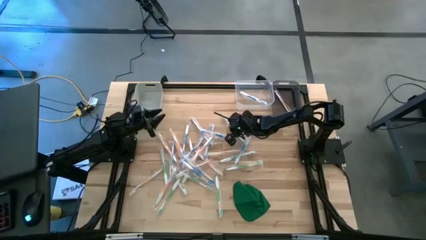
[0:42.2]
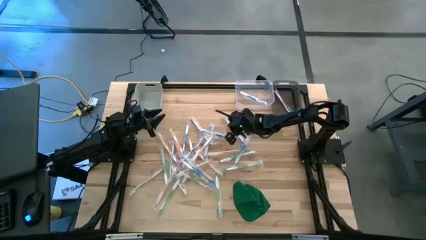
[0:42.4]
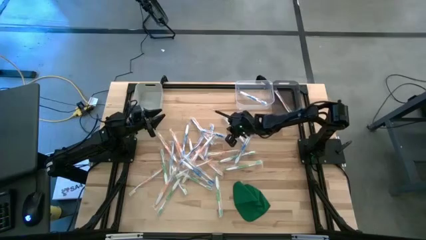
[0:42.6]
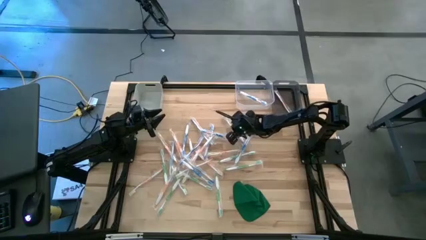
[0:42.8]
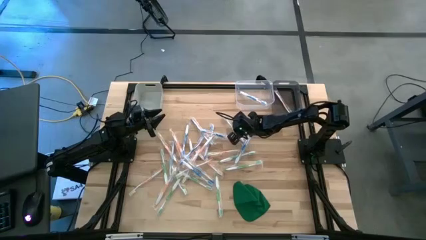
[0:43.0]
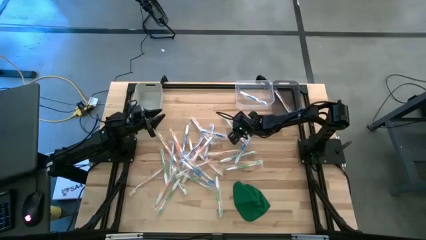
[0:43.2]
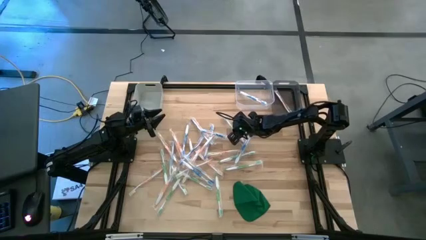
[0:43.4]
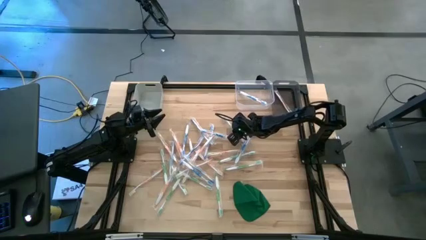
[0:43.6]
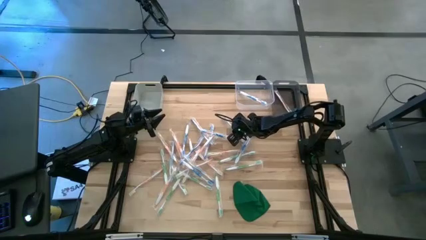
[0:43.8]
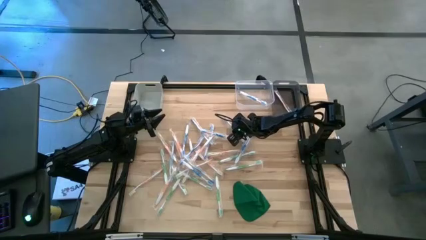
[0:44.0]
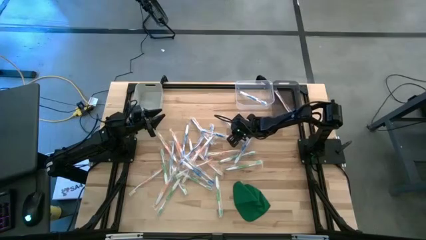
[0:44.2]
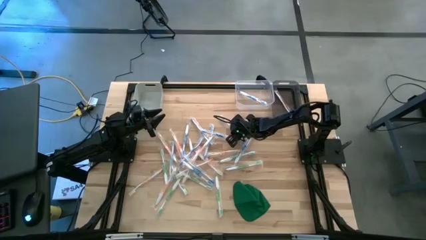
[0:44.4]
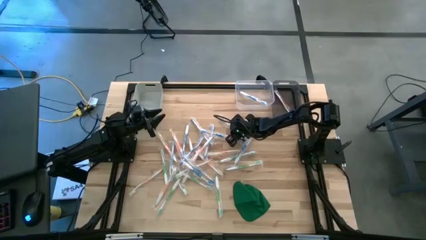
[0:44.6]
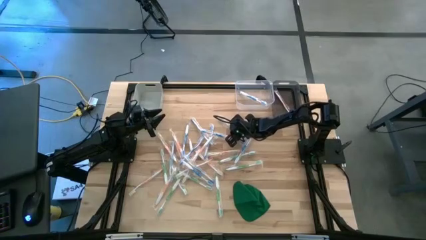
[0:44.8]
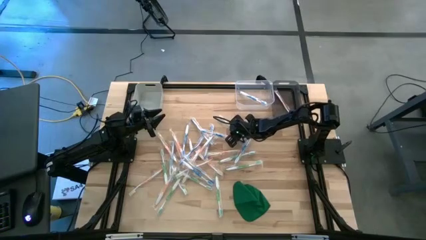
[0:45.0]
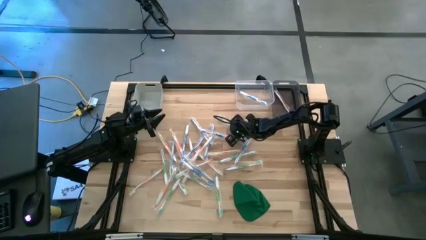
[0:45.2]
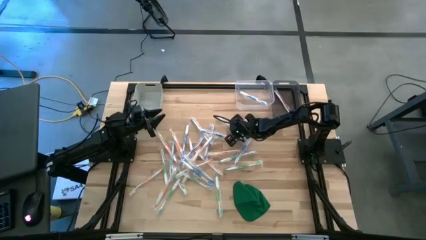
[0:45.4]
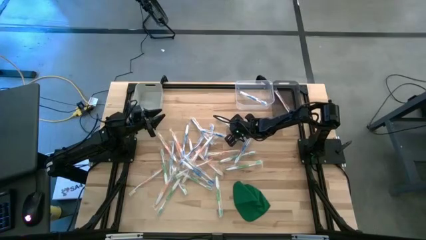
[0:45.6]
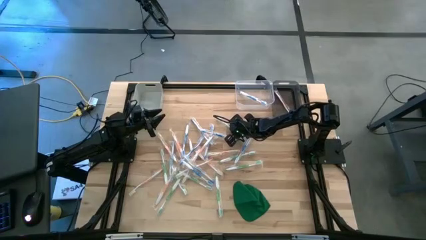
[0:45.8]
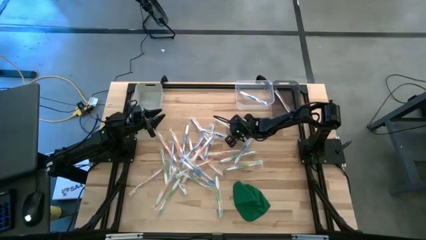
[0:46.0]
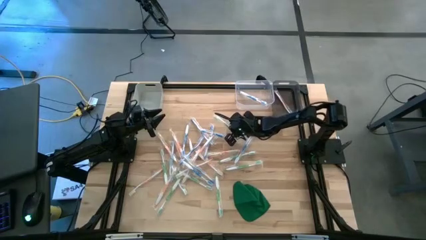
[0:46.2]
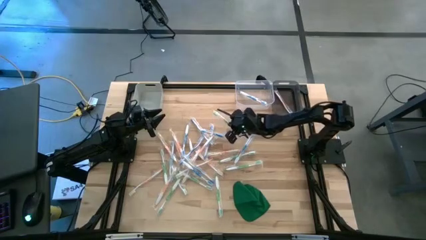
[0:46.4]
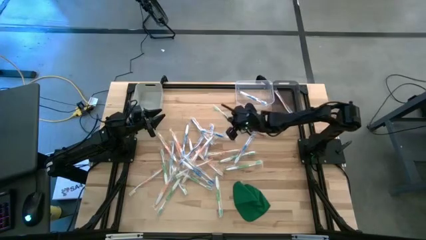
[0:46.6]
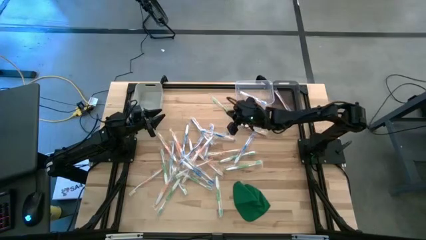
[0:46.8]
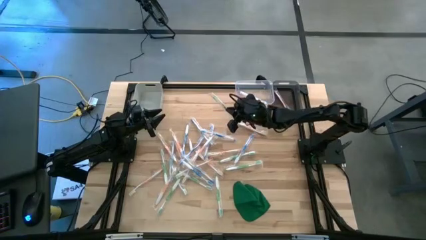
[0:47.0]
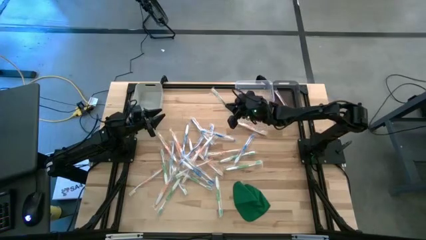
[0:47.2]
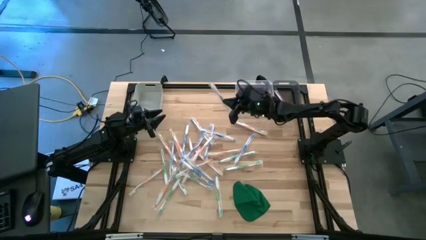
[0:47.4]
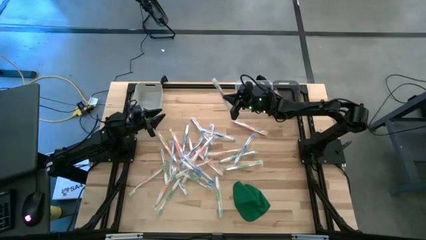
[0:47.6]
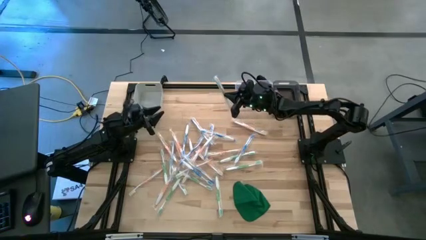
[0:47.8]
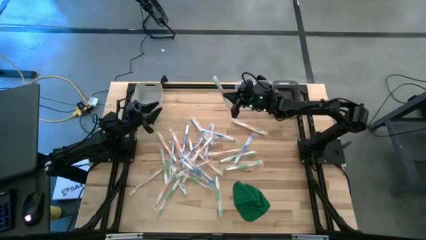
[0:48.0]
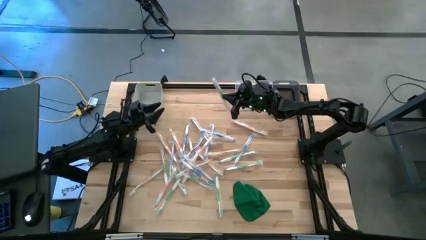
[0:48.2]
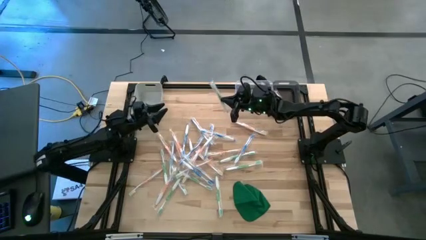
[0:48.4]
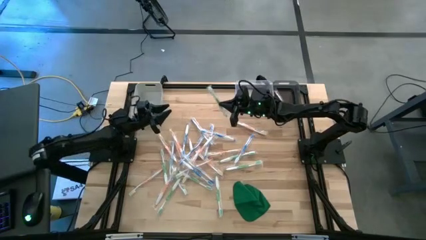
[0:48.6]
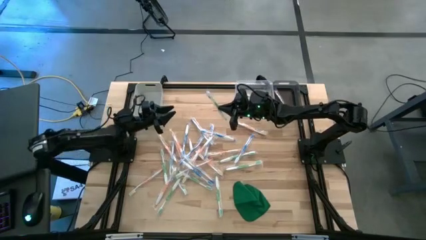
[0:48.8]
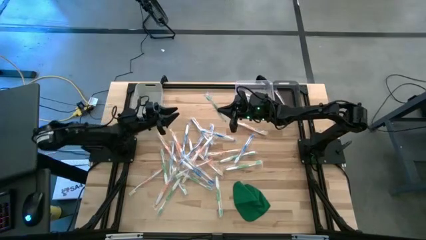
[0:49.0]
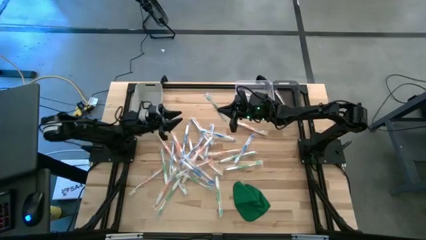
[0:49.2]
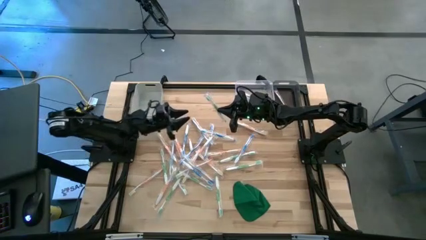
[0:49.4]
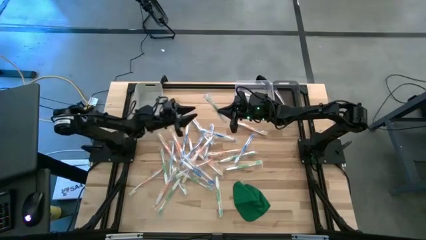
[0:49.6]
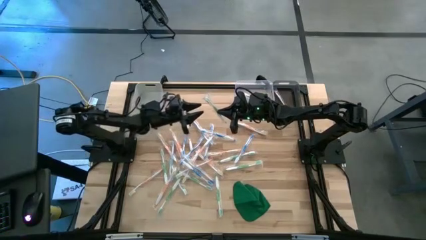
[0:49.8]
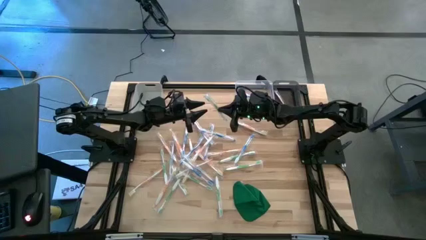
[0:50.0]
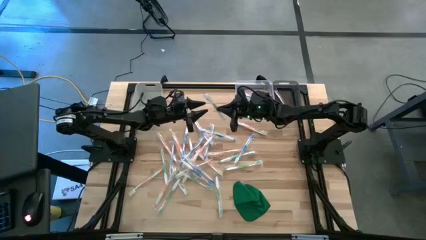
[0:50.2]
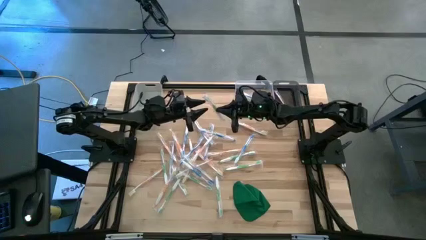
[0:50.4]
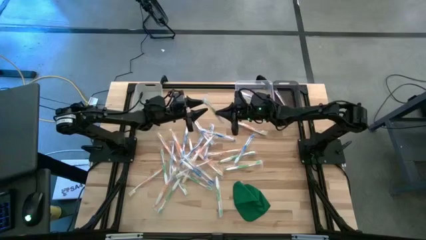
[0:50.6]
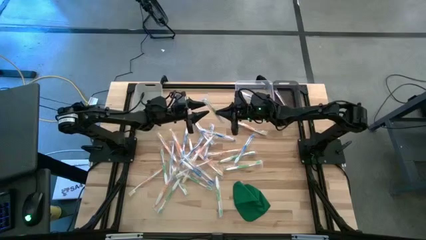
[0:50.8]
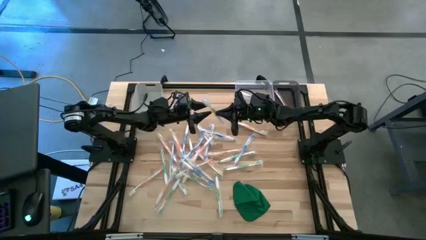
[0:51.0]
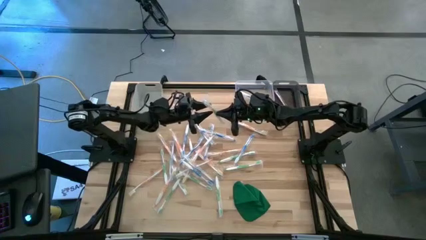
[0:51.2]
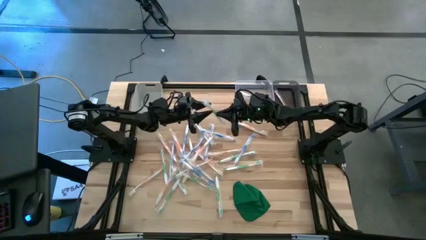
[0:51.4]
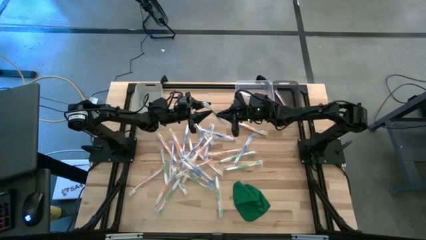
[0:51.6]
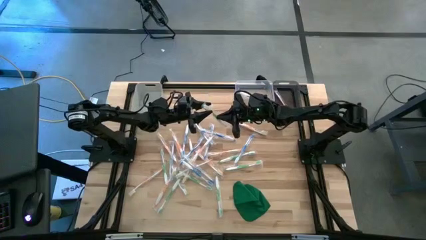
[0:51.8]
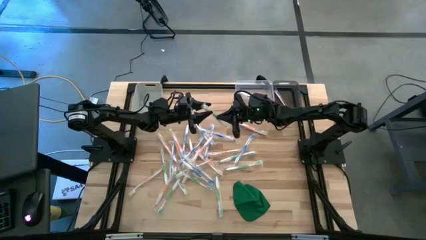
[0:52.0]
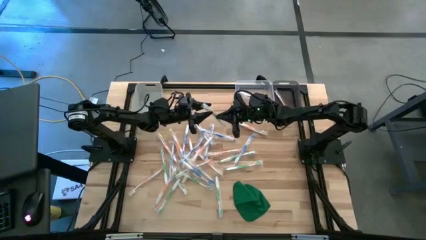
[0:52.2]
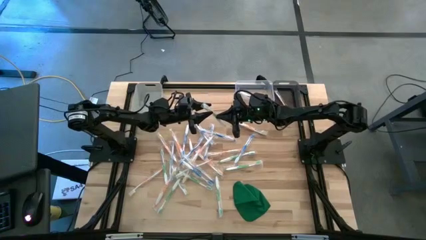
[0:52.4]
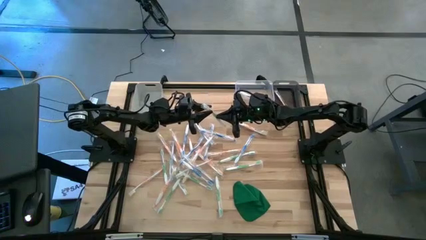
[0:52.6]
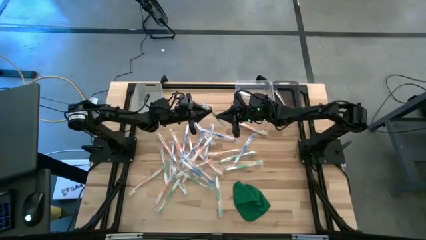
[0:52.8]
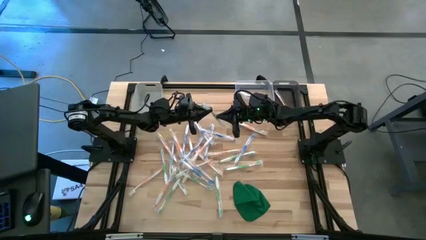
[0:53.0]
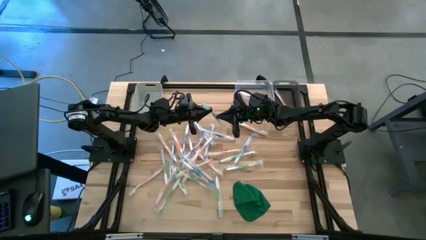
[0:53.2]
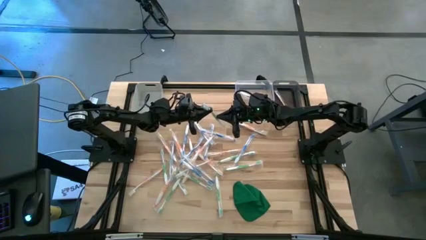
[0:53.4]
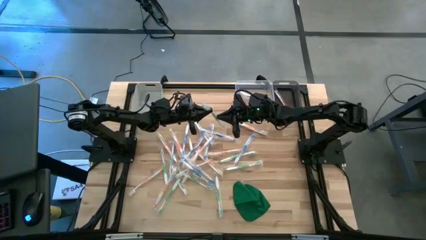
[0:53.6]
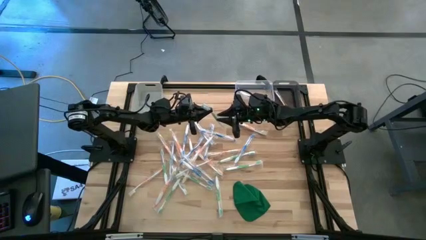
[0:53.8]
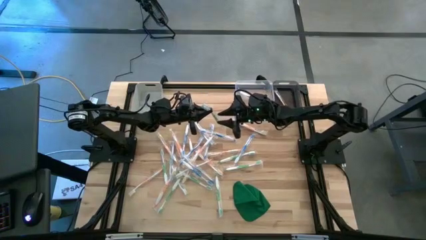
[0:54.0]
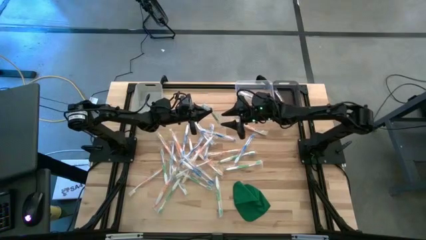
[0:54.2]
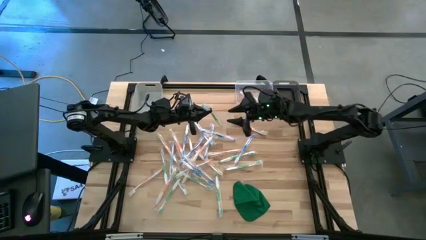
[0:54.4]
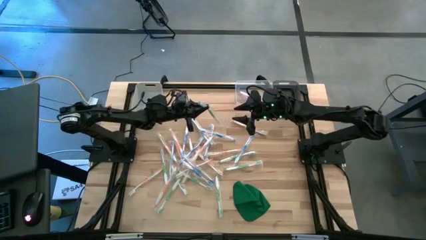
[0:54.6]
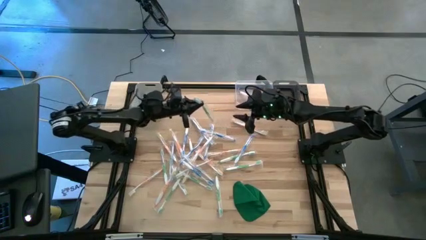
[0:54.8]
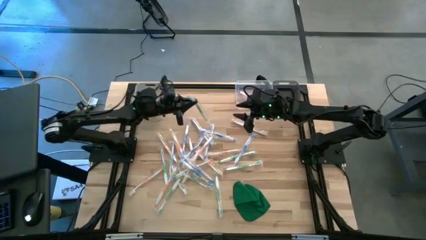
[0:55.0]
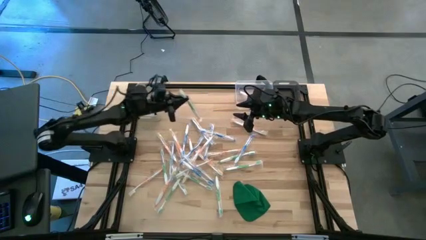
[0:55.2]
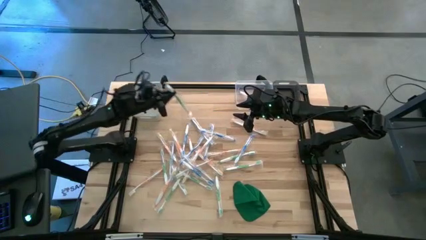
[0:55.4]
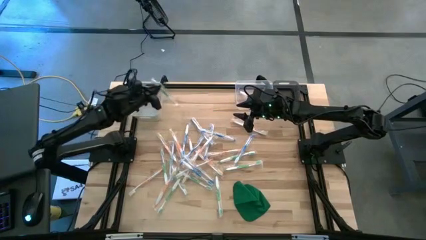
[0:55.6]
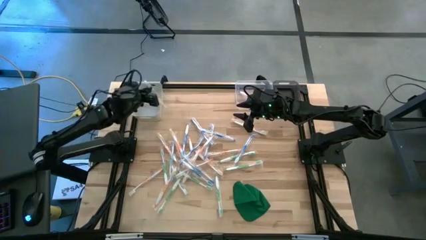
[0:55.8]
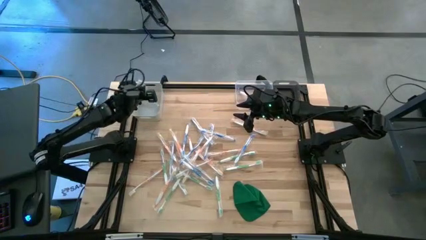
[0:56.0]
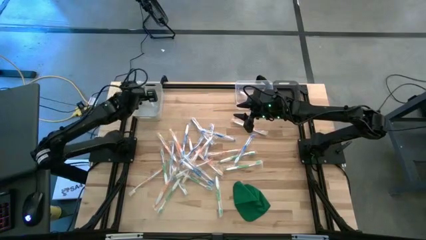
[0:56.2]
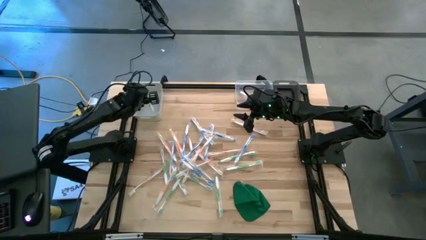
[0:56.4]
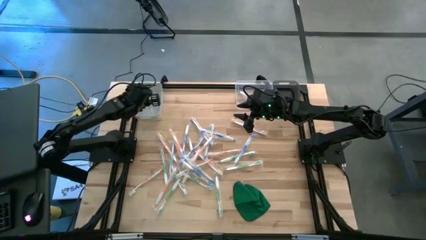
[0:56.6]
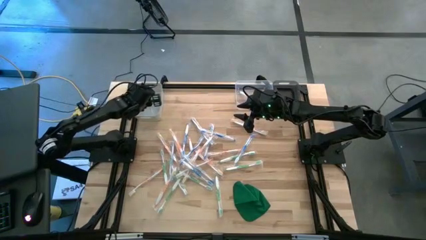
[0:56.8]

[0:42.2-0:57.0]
Task: Pick & Place Toothbrushes
Put the green toothbrush into the gray bin
